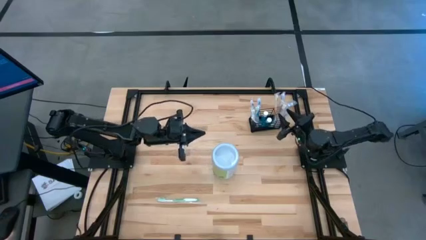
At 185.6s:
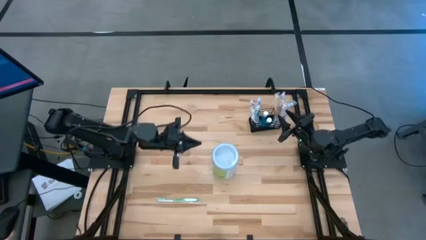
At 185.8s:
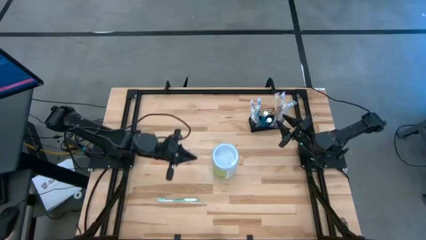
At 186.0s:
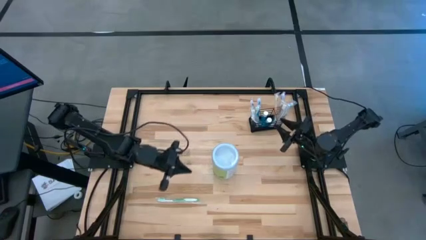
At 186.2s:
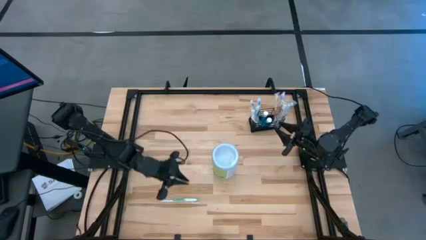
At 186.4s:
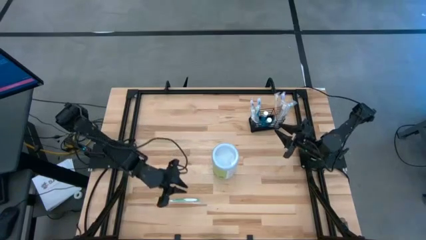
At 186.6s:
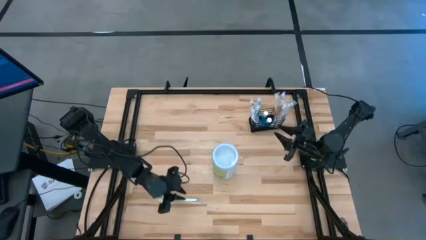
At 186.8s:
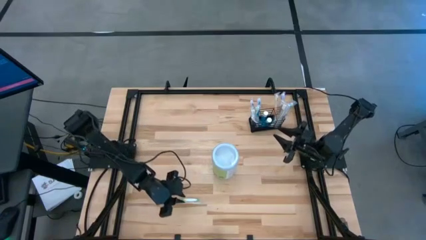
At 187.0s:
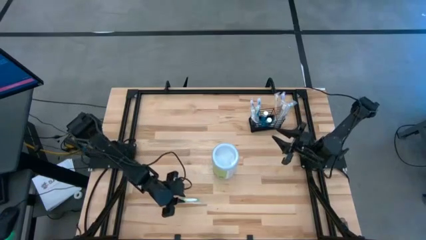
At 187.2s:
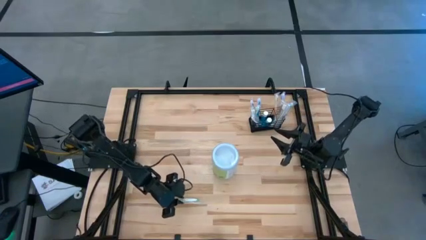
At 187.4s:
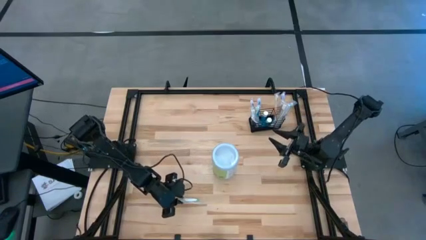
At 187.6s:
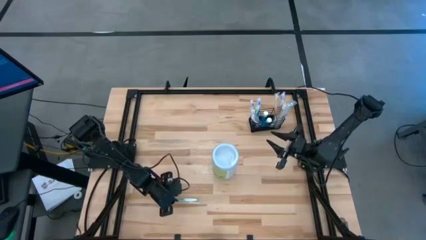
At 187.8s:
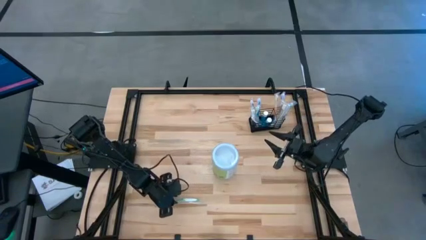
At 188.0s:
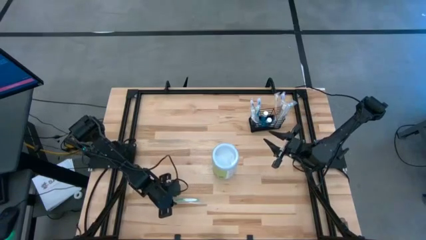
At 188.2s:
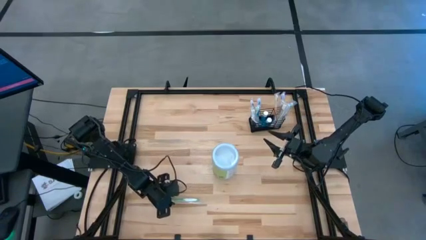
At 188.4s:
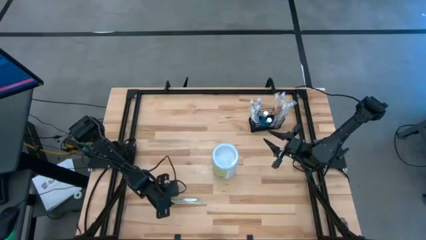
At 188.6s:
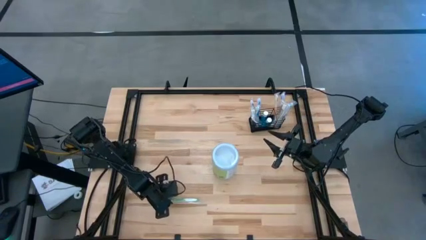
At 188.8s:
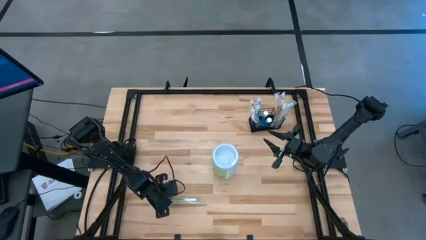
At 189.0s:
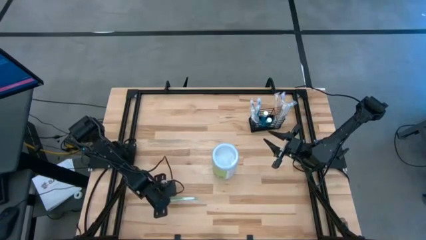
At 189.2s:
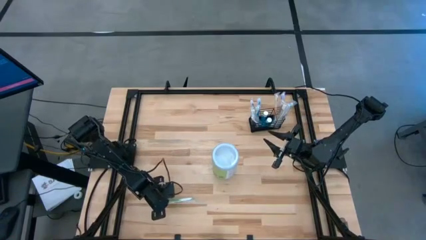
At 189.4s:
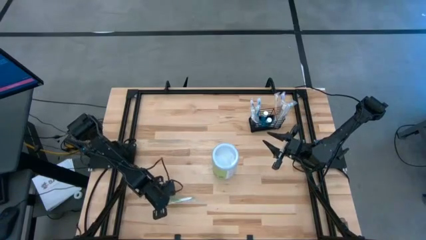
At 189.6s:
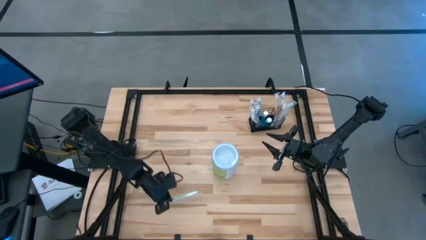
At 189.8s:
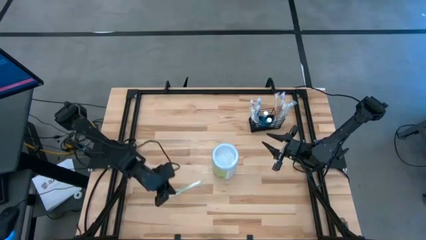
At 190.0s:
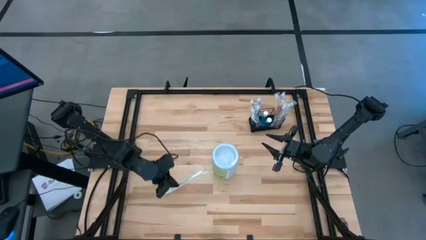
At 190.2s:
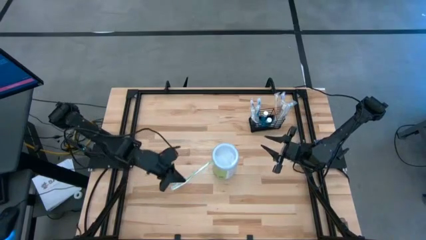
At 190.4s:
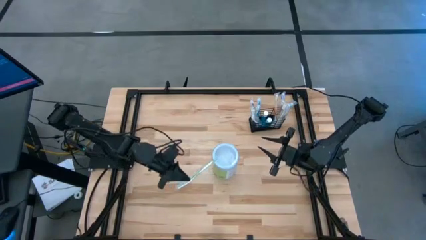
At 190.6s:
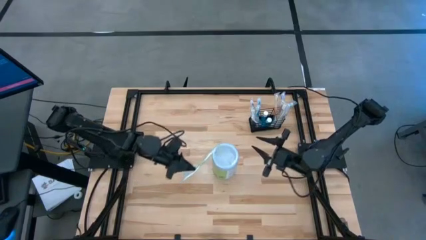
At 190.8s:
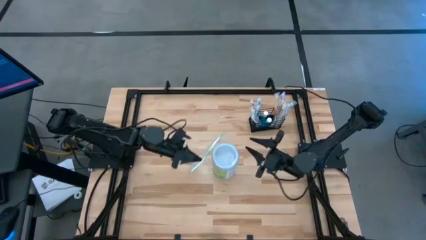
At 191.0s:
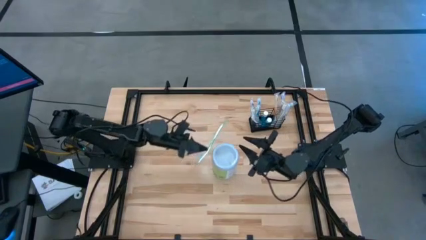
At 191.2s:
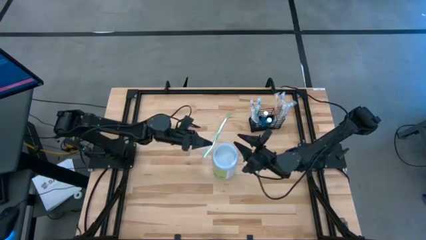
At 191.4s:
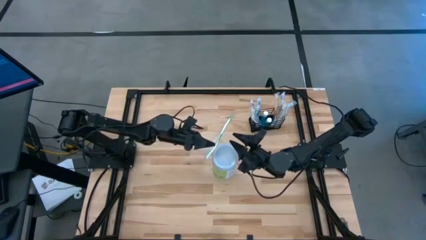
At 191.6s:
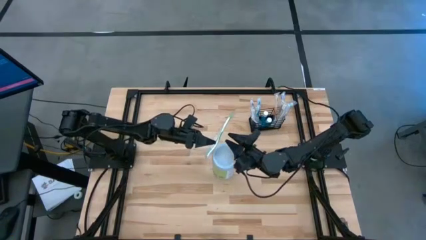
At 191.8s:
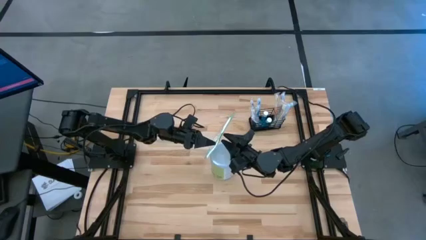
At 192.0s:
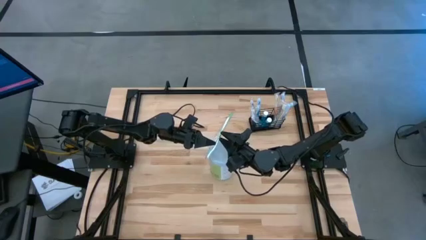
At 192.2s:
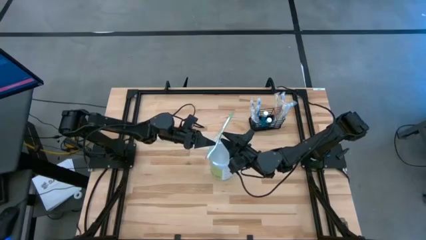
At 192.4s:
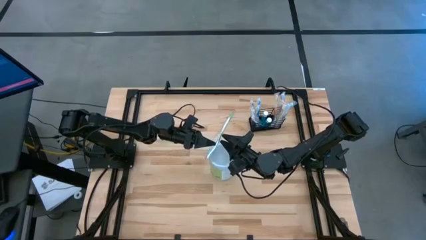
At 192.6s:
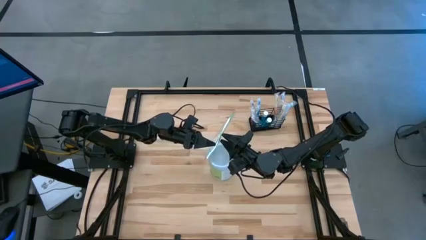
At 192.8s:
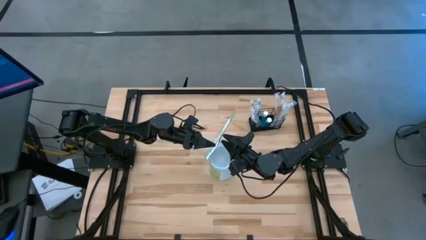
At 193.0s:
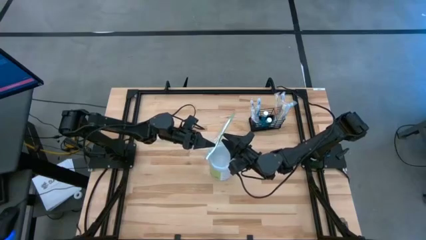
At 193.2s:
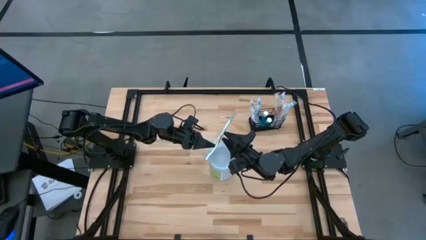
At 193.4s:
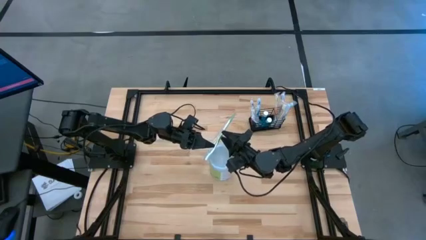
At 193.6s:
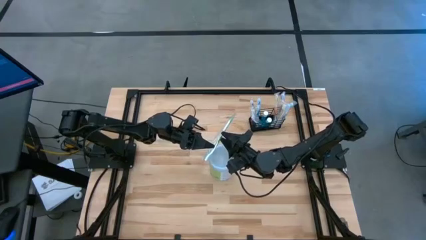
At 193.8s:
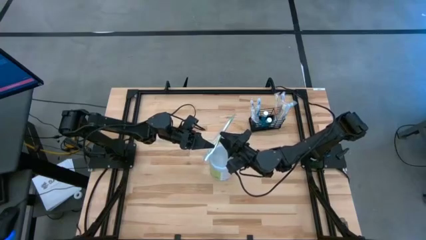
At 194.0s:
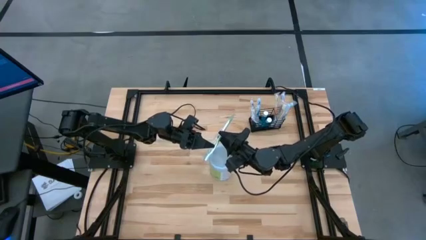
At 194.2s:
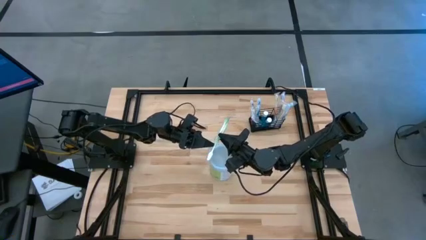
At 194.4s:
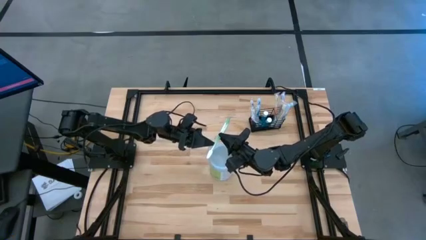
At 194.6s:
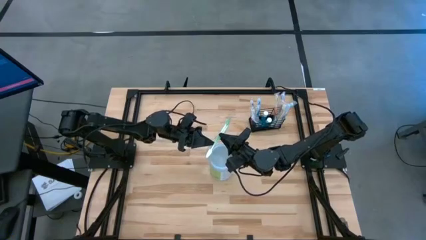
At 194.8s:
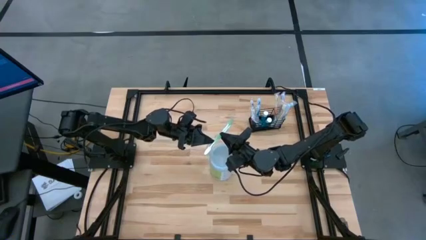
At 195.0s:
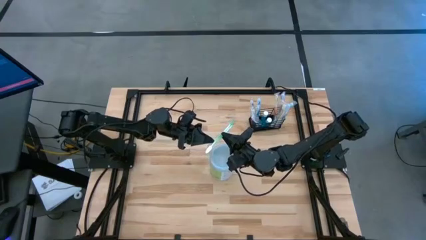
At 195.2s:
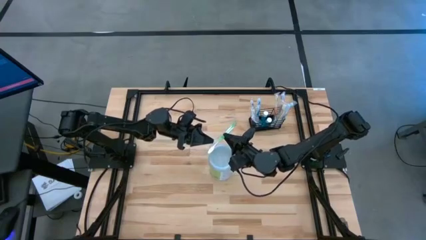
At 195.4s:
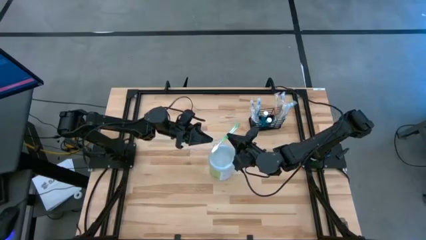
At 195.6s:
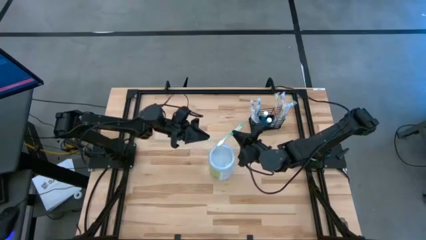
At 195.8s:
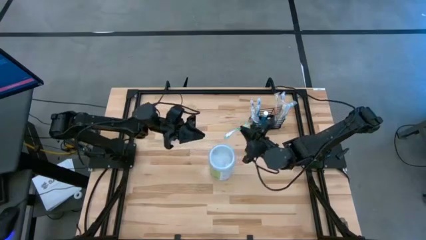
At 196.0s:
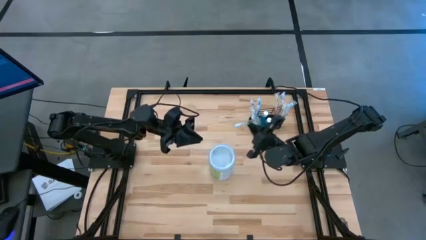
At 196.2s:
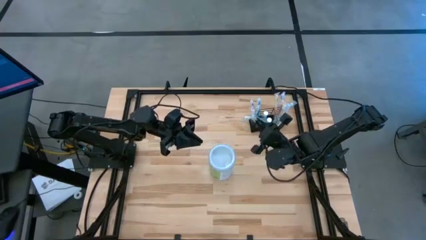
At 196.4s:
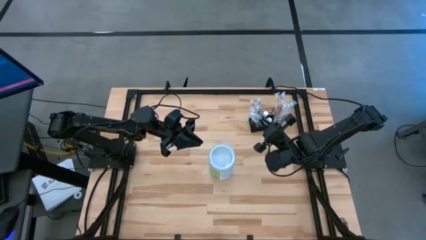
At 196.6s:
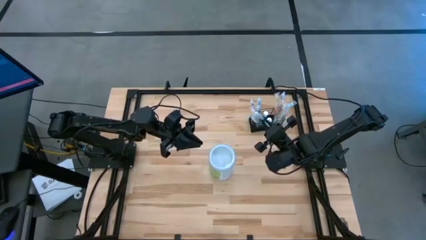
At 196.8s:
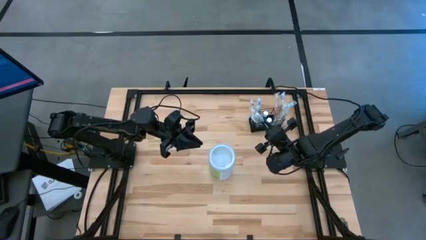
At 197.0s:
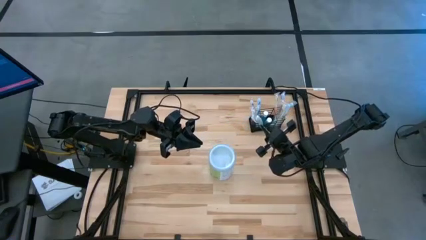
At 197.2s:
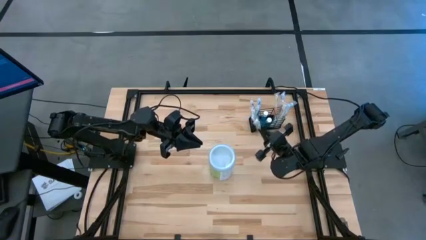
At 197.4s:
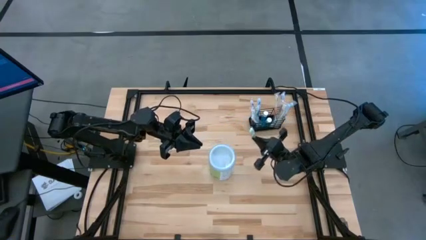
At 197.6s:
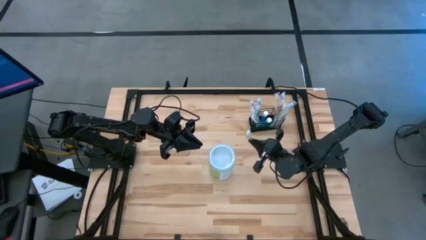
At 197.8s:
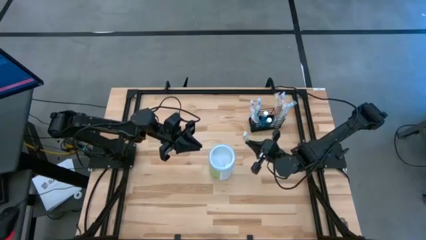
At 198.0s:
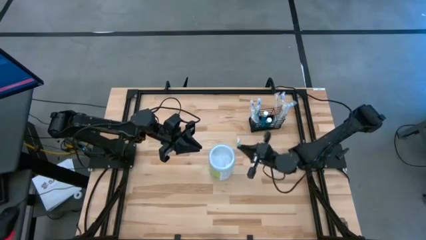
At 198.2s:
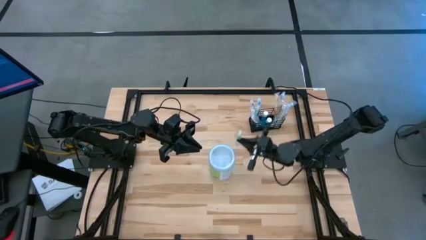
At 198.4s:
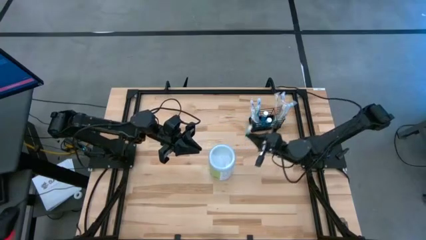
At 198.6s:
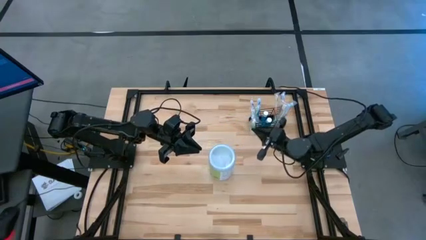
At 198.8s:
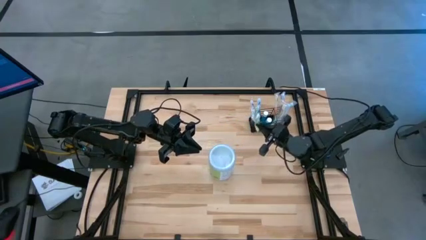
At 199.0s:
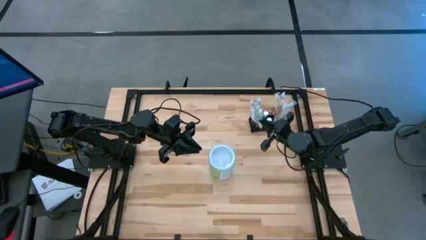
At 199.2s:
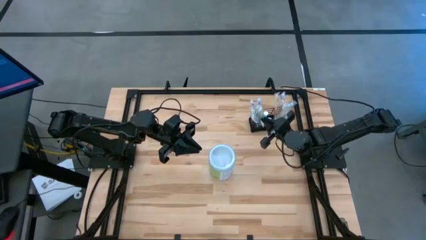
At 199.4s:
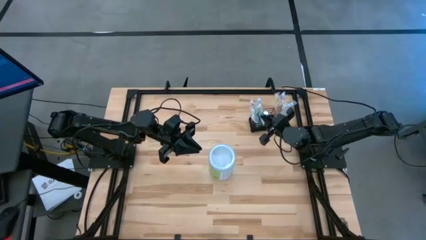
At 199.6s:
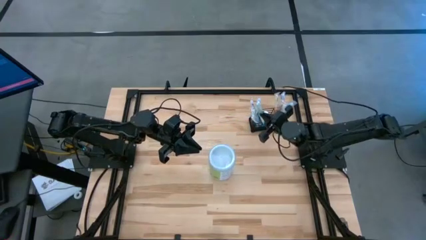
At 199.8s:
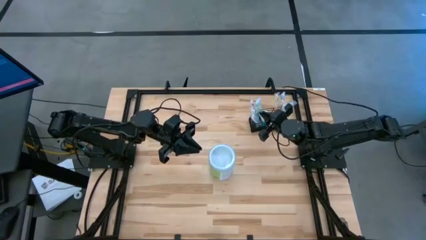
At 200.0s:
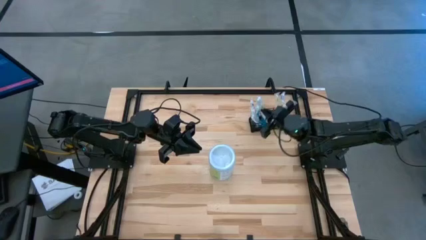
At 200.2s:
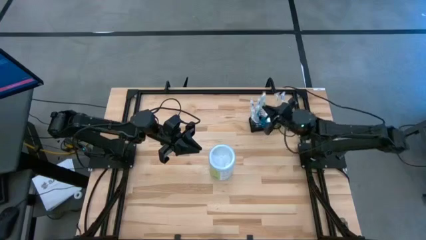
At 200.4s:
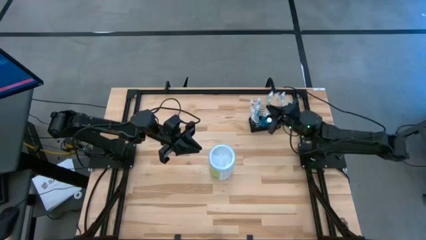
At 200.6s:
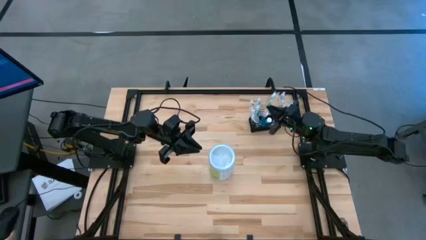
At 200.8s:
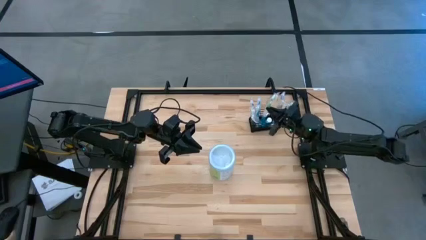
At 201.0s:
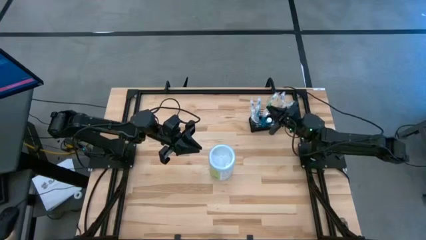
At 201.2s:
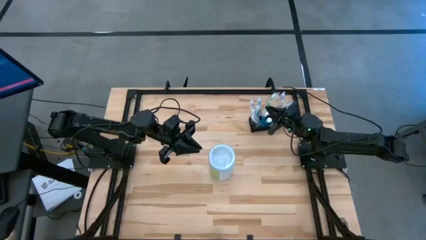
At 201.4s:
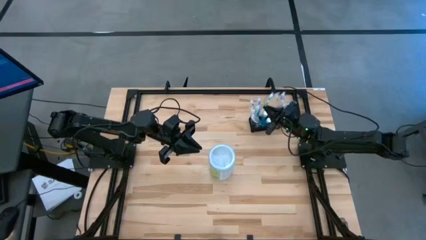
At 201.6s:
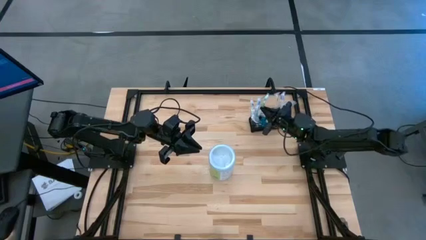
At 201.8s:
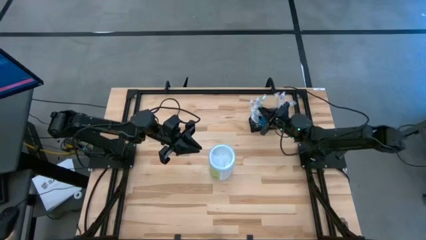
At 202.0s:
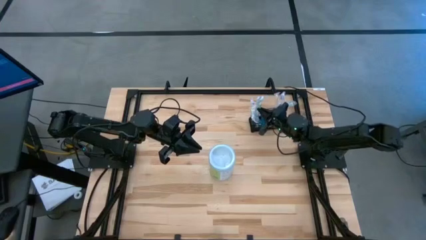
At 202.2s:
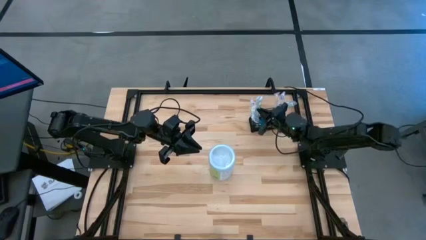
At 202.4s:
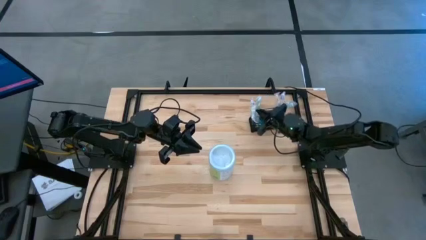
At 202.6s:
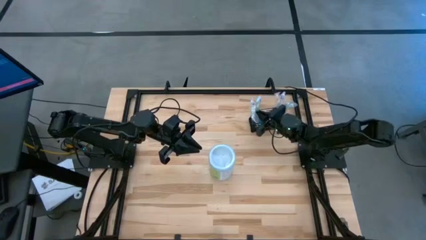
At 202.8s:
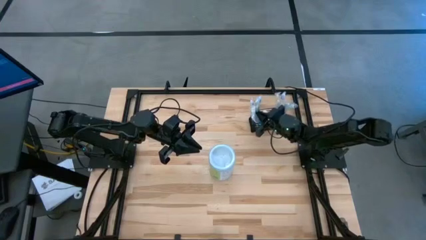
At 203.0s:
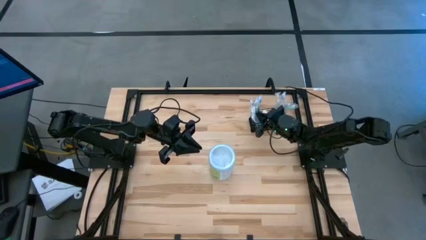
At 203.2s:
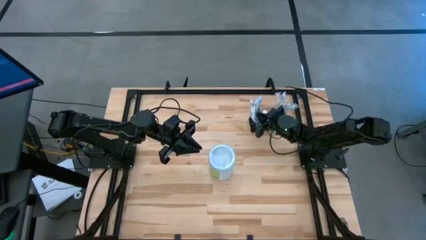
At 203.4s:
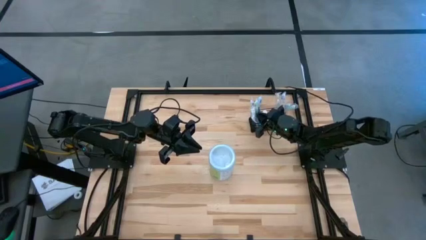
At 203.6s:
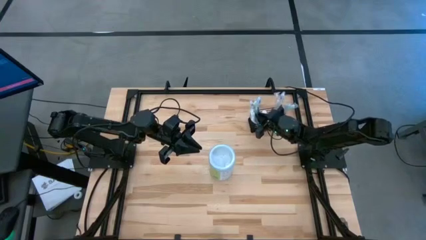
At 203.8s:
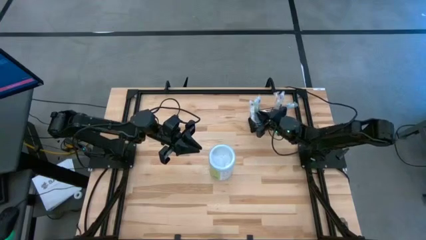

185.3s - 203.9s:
Task: Pick & Place toothbrushing station
Put the green toothbrush into the wire organizer
